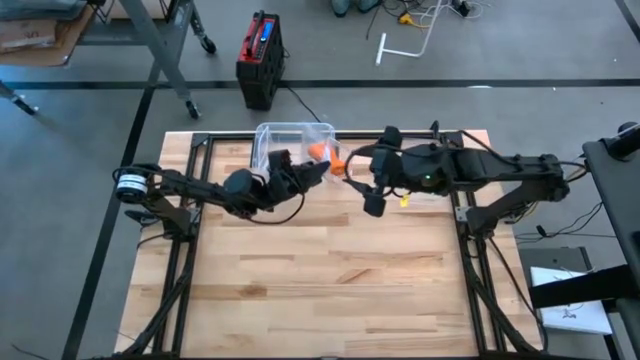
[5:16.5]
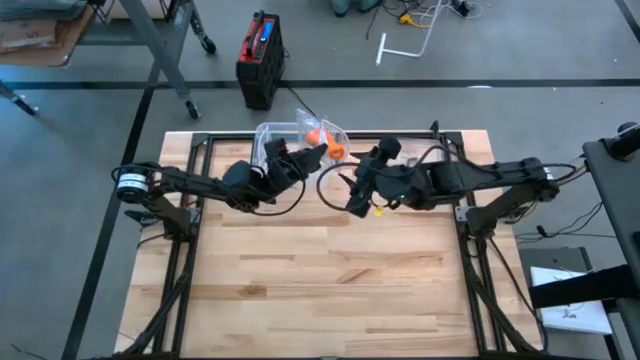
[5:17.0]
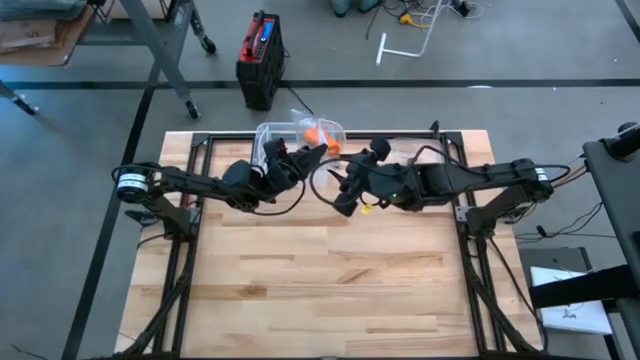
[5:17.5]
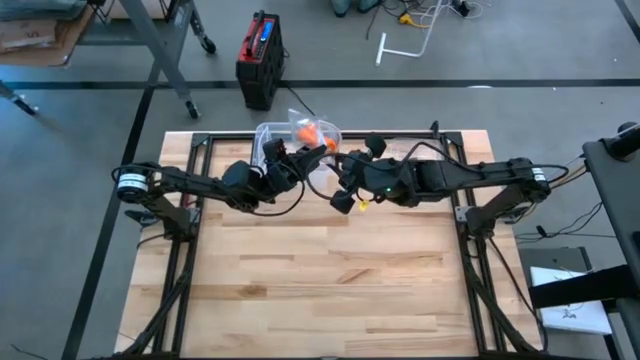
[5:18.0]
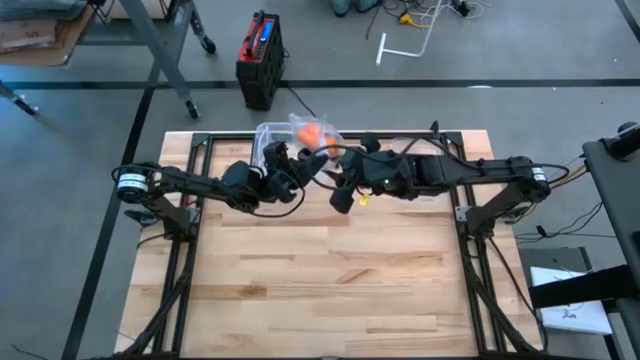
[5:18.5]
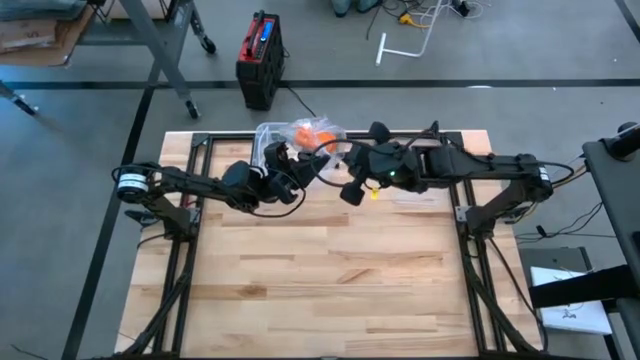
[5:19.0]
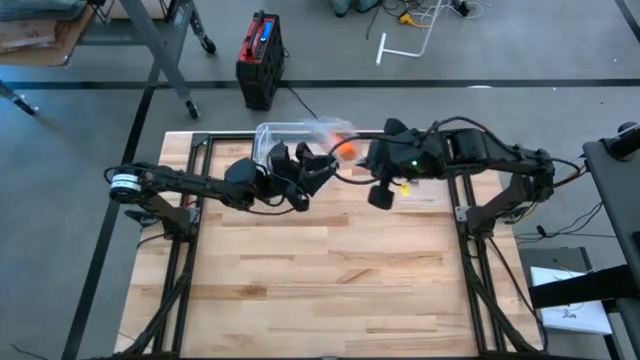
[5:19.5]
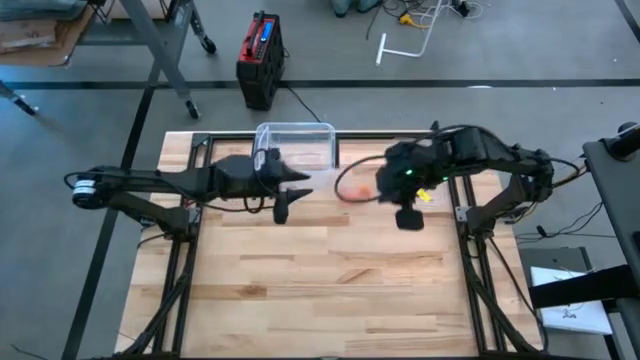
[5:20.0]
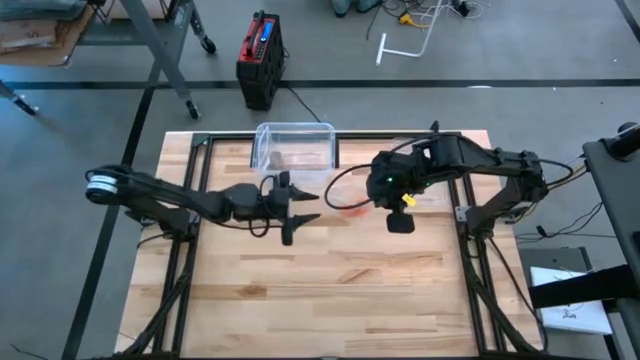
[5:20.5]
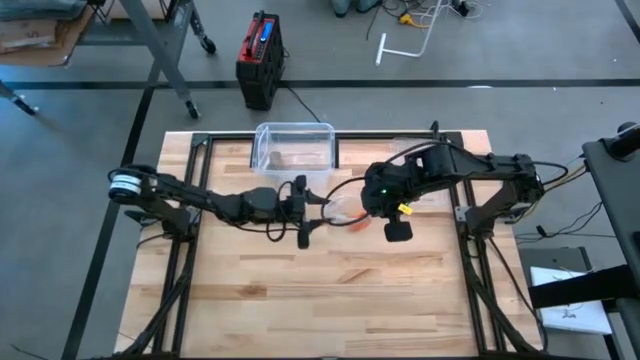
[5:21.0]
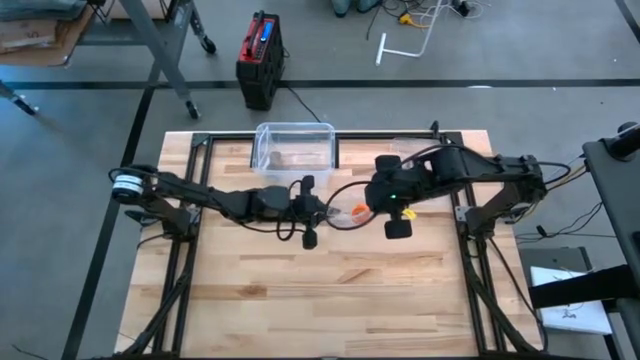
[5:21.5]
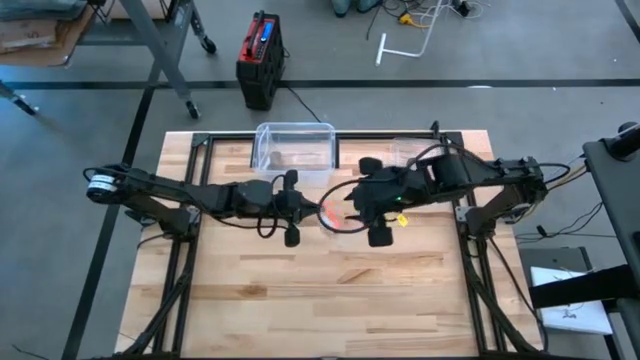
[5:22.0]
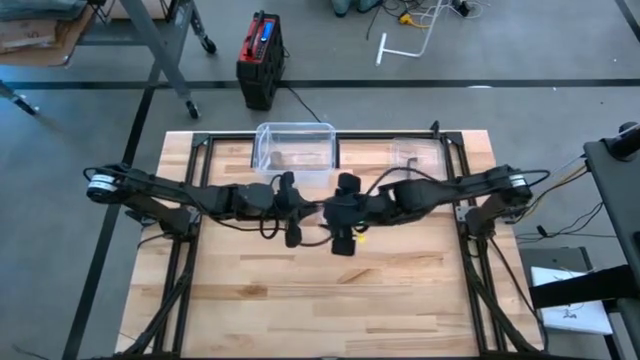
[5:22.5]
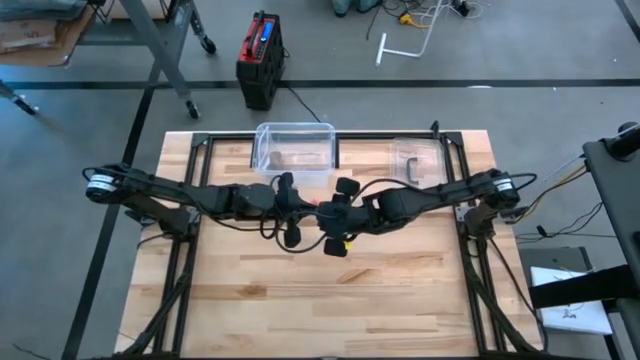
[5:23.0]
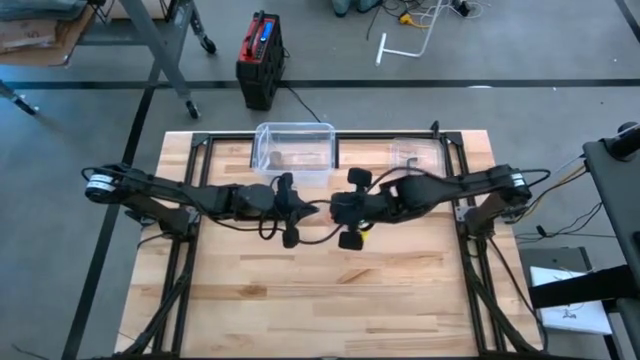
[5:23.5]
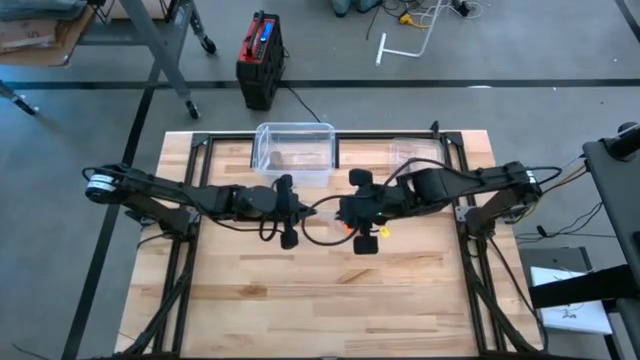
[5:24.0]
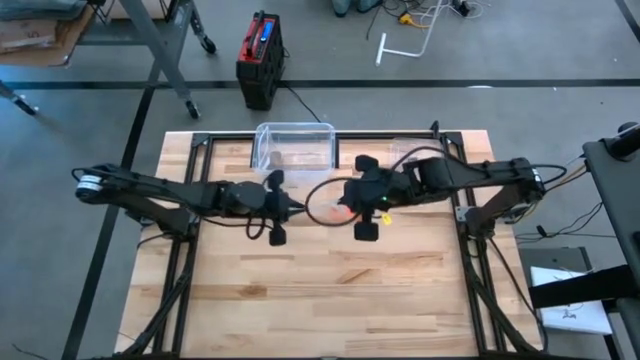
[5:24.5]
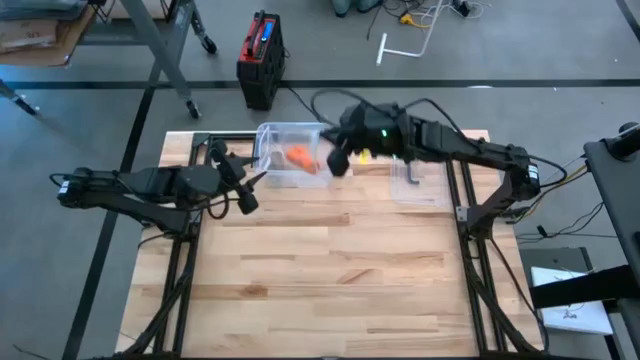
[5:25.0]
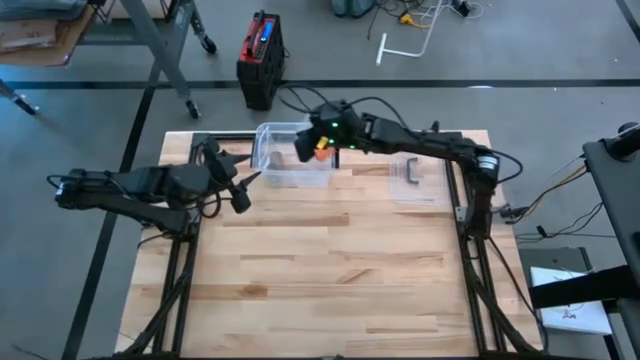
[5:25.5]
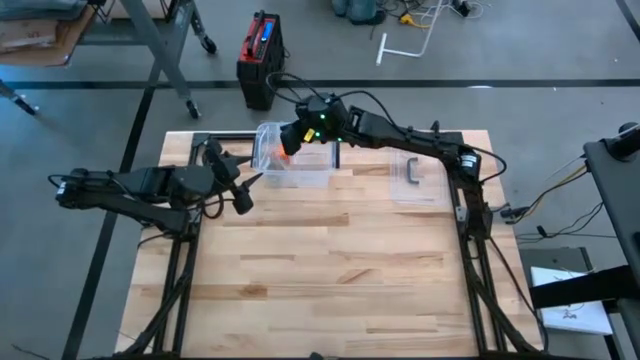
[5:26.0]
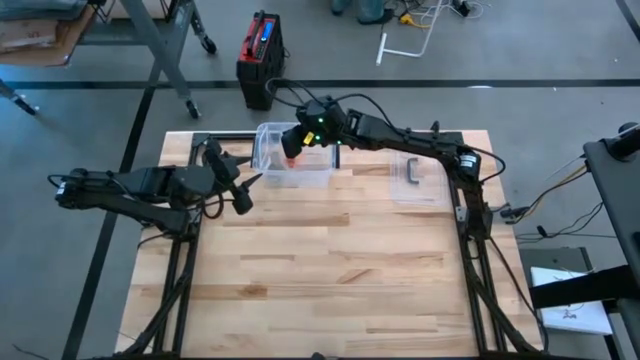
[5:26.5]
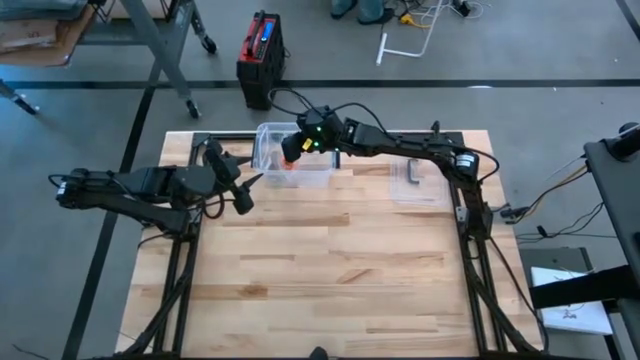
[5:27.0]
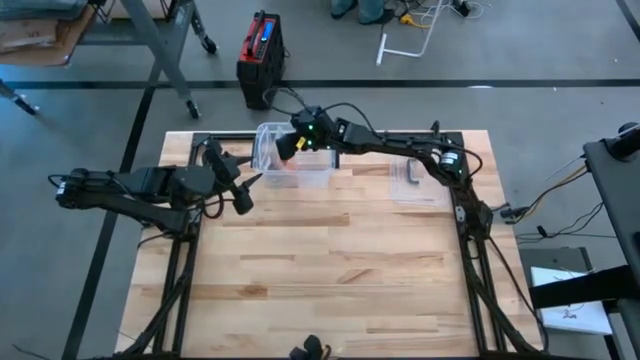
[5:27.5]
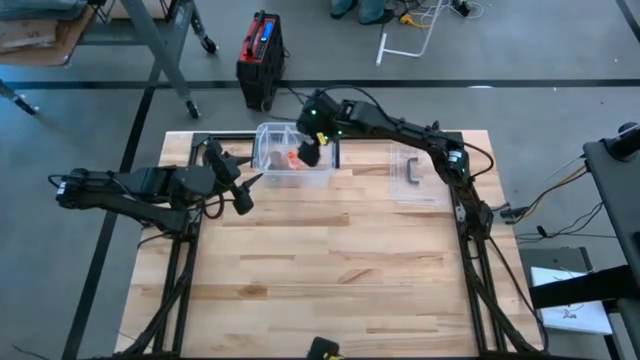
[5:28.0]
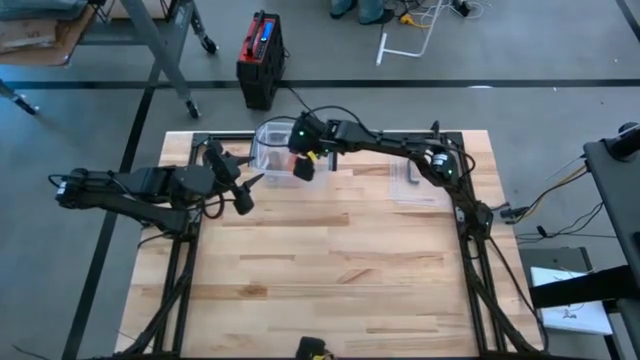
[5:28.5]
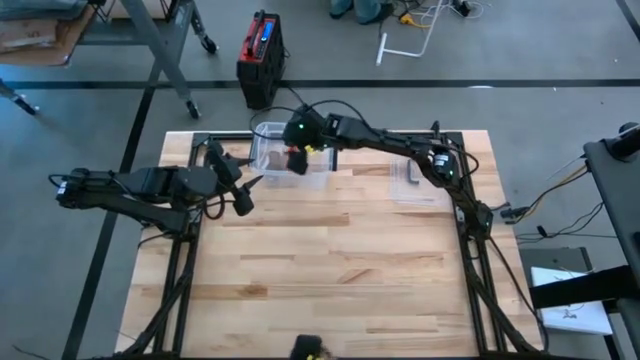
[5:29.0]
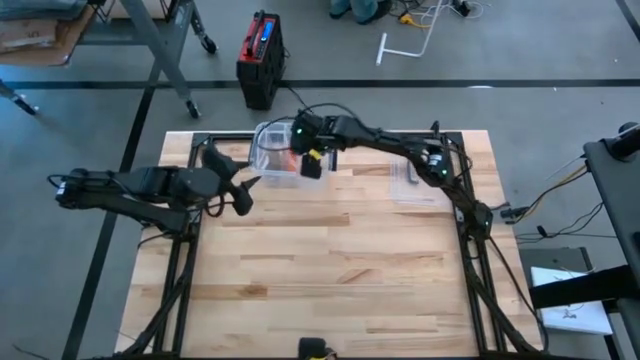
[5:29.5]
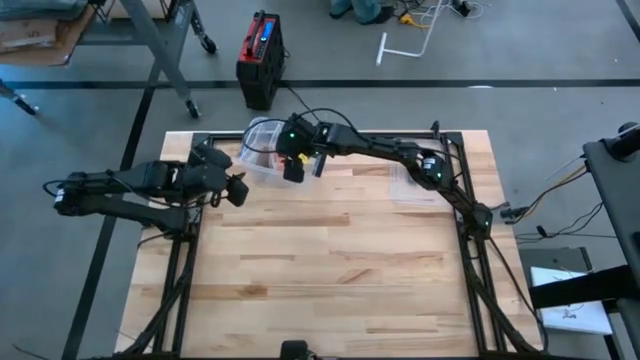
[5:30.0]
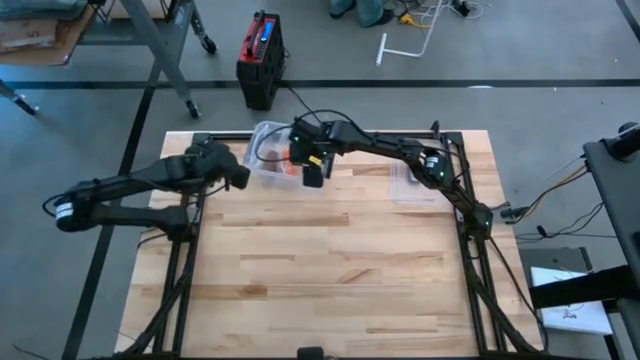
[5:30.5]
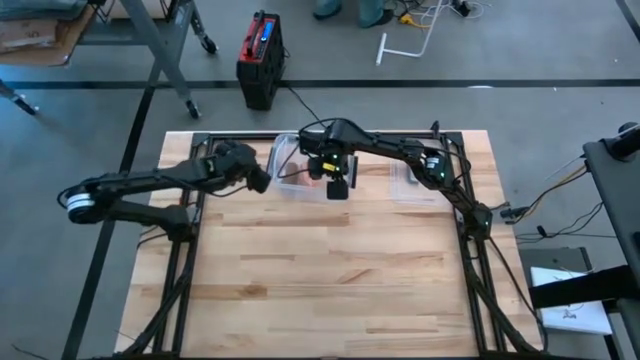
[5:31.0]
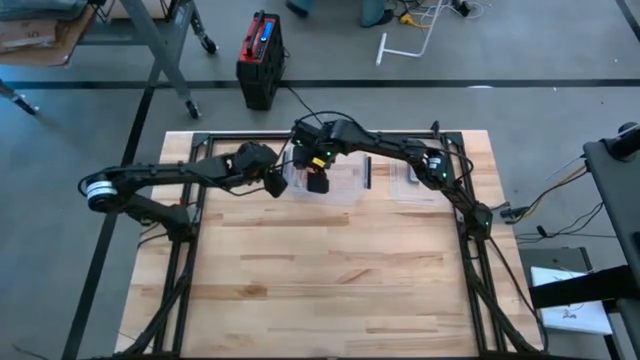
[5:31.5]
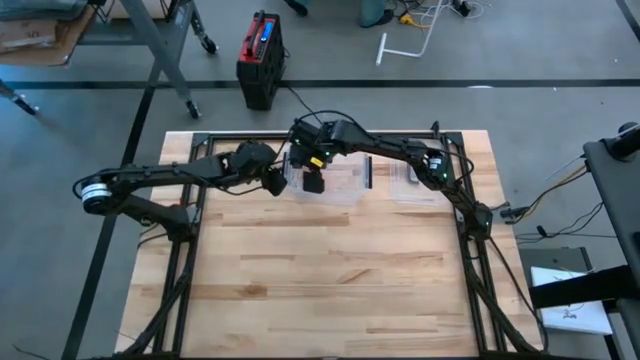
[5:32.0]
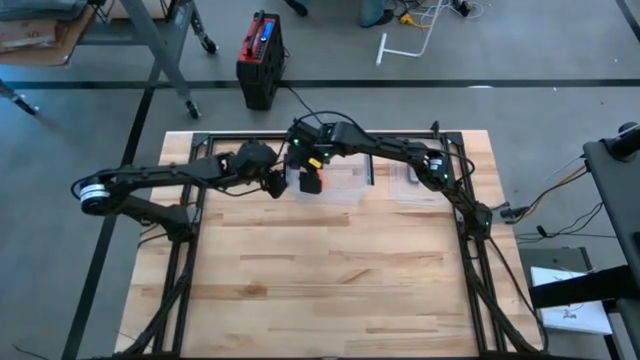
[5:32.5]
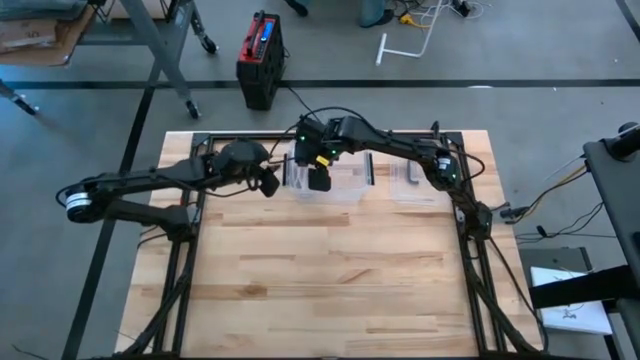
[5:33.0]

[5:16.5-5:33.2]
Task: Roll bandage
Put the transparent zip bag into the transparent bin

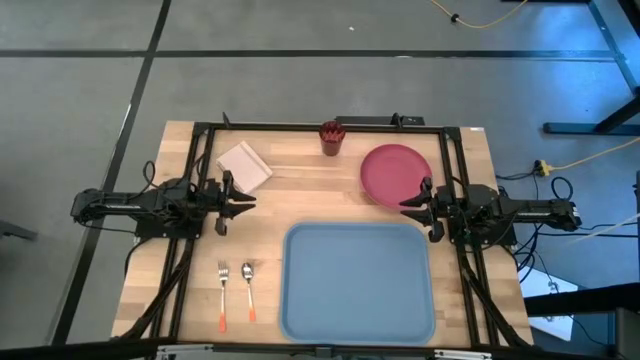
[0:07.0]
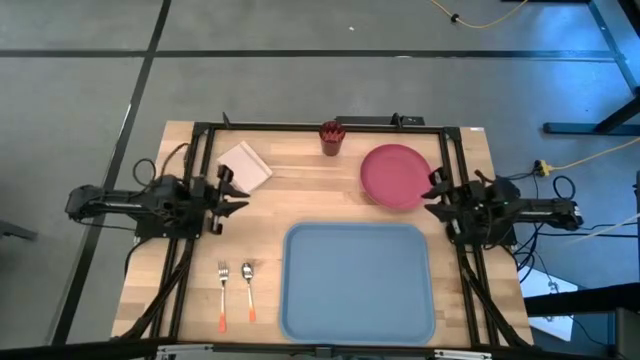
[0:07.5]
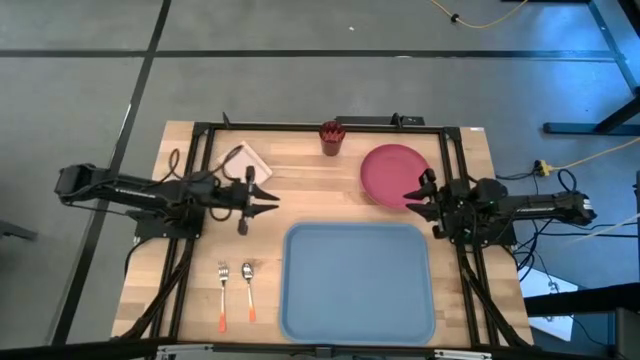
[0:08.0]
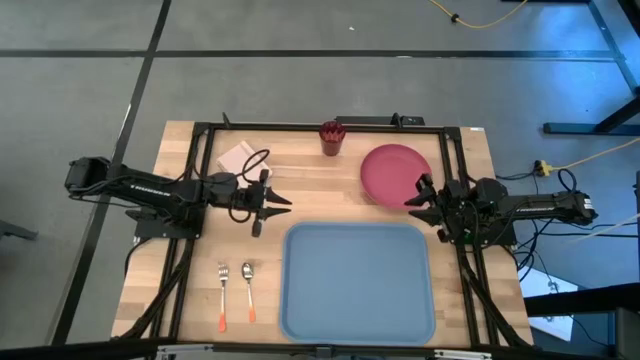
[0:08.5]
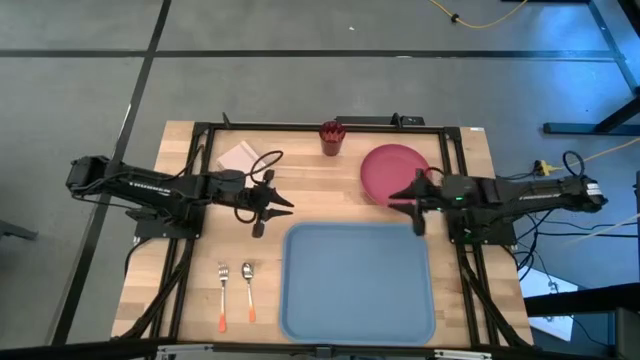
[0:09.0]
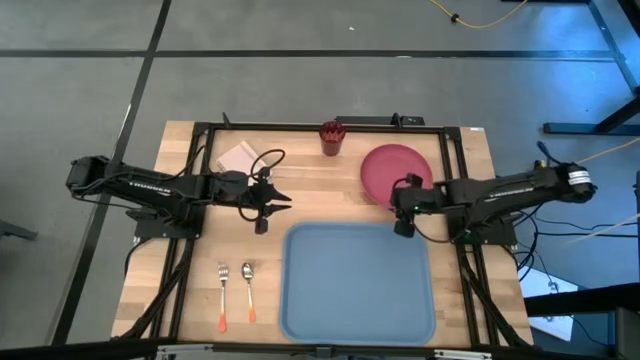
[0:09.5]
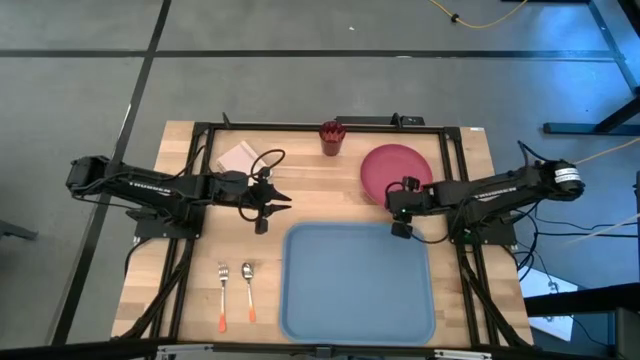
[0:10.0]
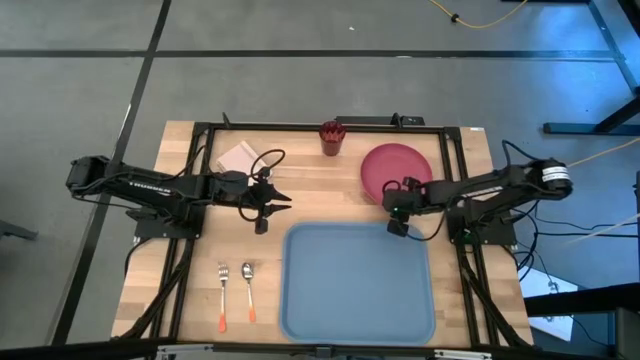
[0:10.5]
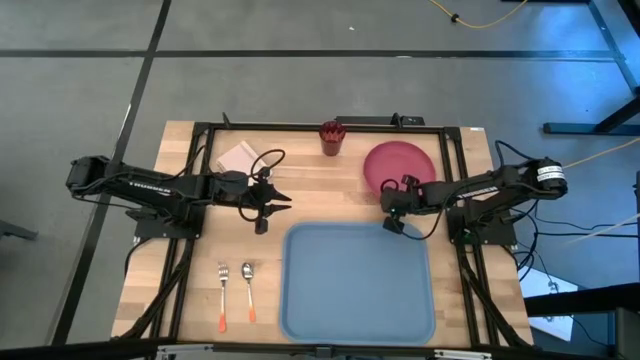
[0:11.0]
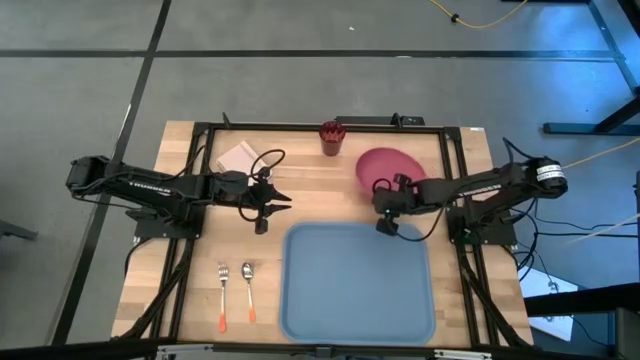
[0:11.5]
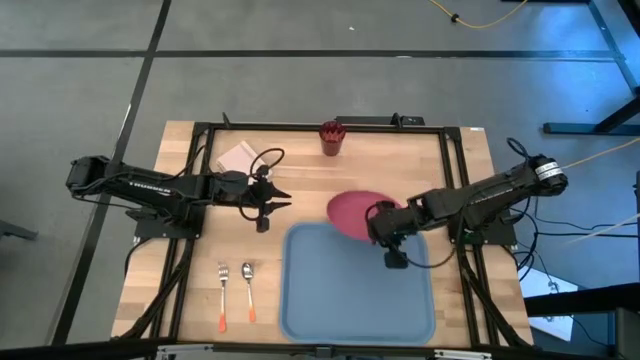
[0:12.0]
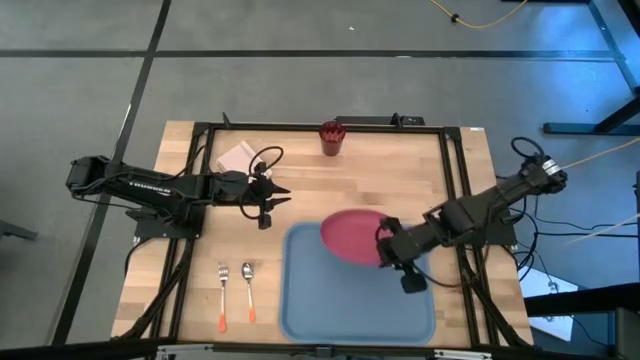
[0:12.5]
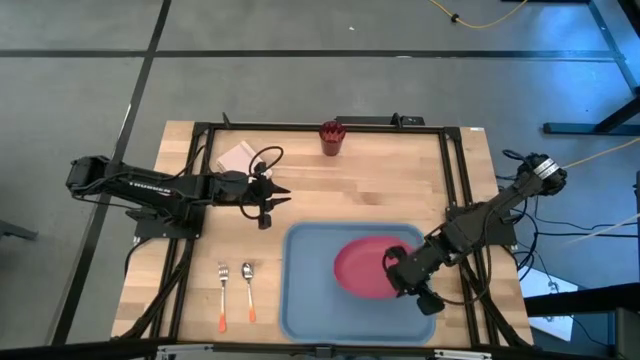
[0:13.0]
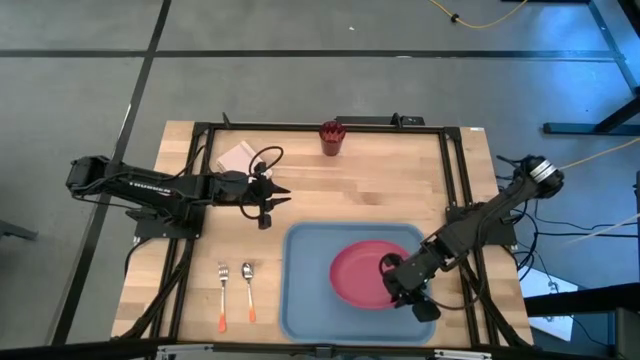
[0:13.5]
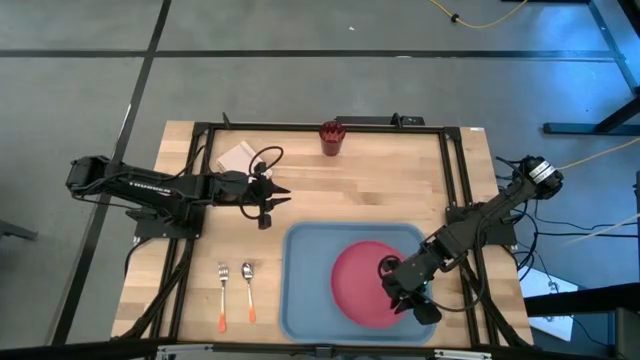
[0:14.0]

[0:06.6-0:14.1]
Task: Pick and place plate/cup/fork/spoon on tray
Put the pink plate on the serving tray
